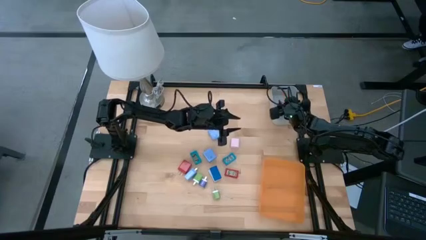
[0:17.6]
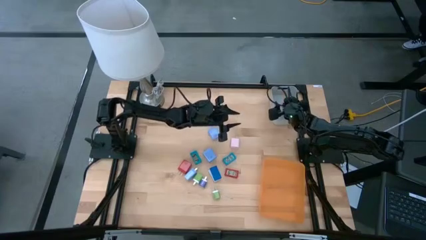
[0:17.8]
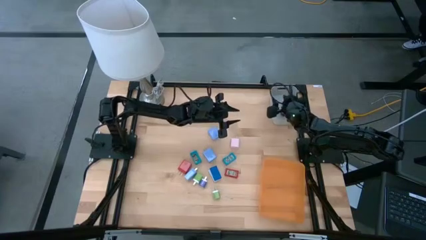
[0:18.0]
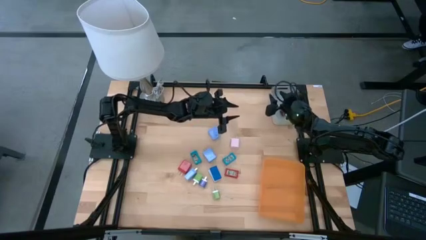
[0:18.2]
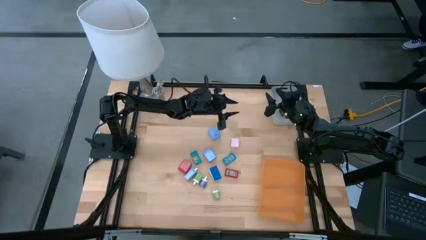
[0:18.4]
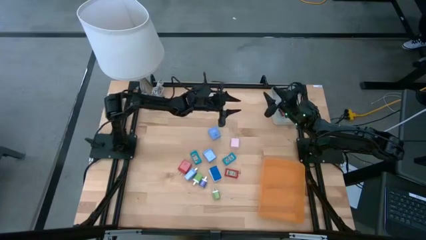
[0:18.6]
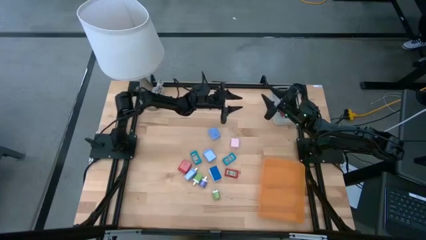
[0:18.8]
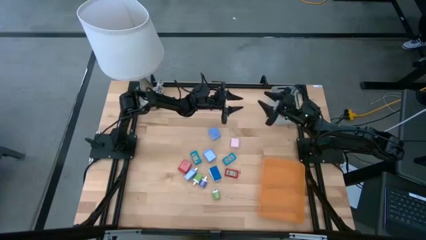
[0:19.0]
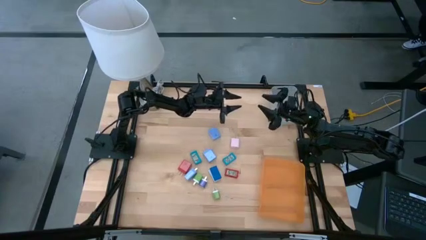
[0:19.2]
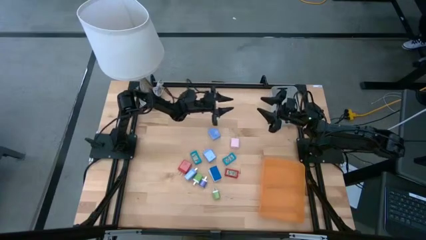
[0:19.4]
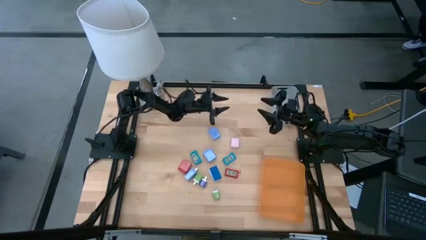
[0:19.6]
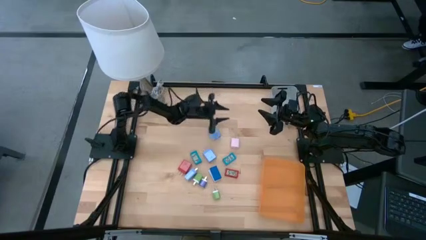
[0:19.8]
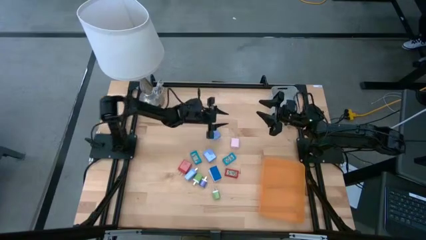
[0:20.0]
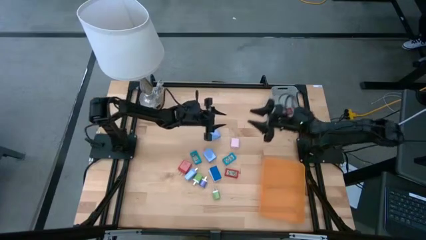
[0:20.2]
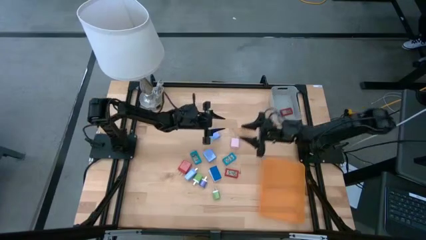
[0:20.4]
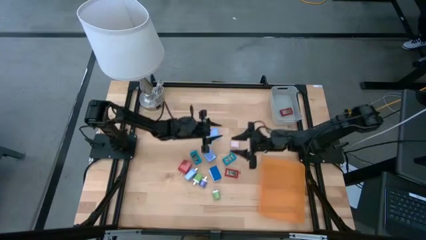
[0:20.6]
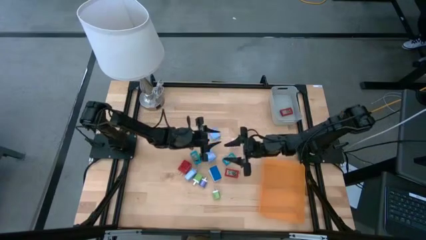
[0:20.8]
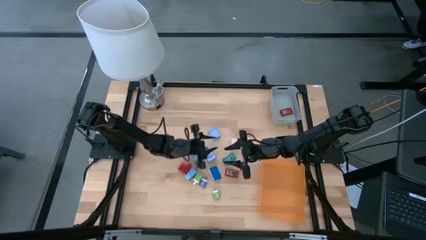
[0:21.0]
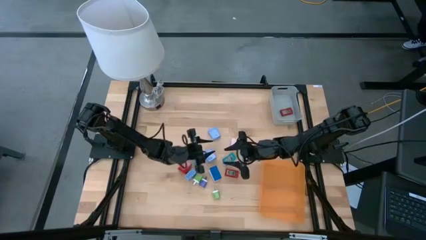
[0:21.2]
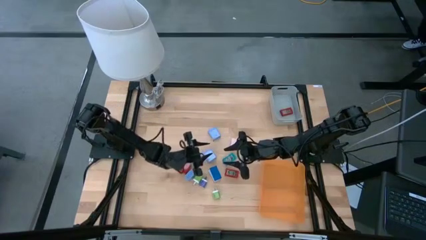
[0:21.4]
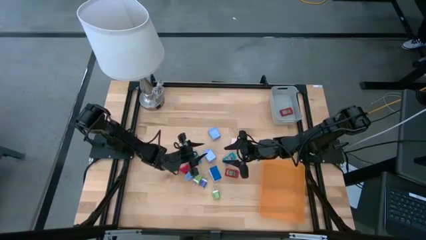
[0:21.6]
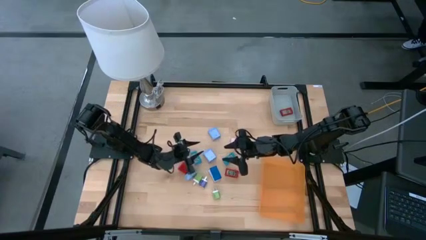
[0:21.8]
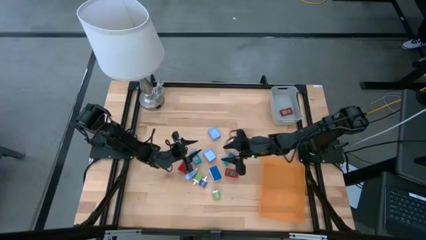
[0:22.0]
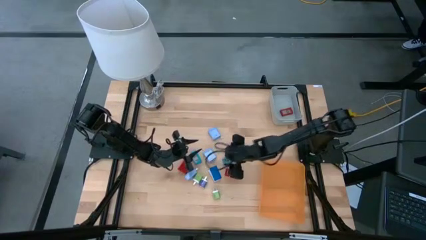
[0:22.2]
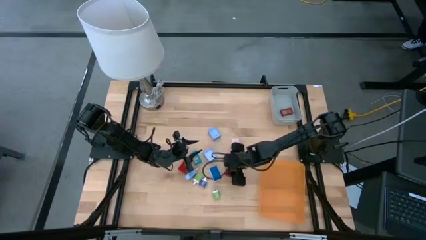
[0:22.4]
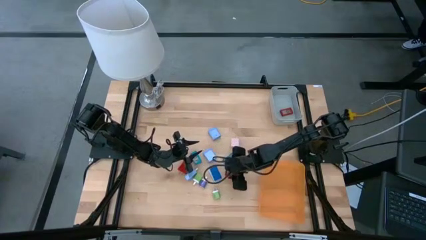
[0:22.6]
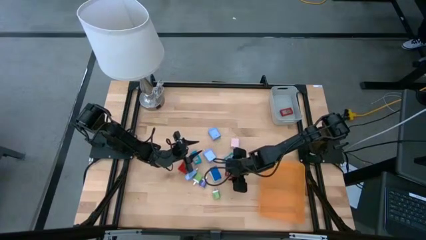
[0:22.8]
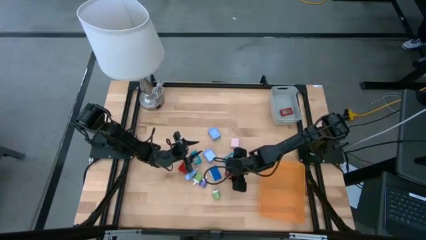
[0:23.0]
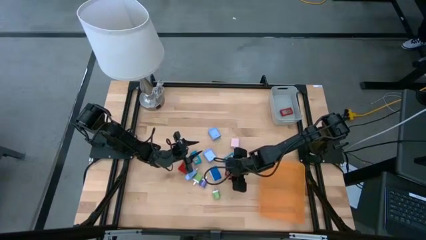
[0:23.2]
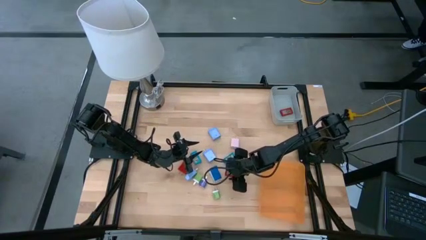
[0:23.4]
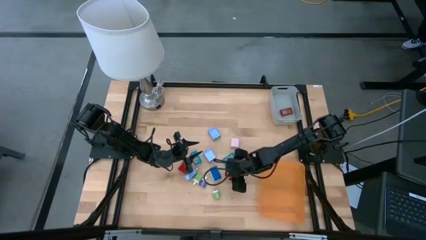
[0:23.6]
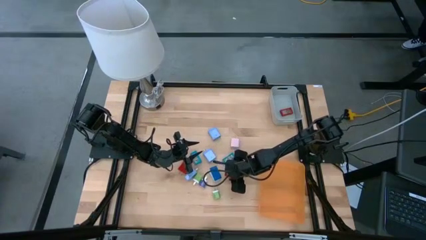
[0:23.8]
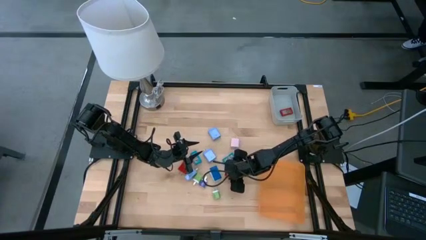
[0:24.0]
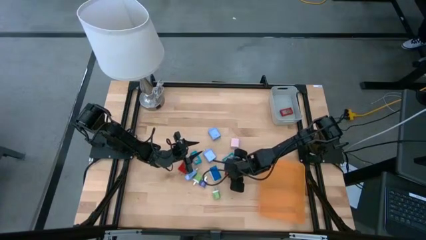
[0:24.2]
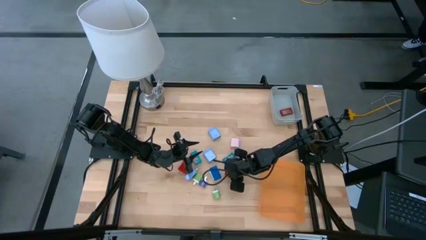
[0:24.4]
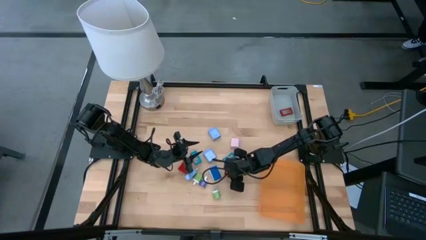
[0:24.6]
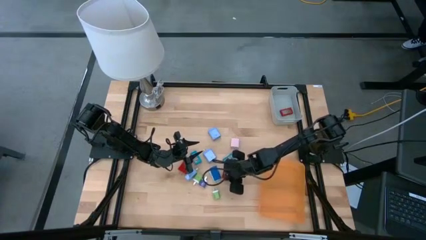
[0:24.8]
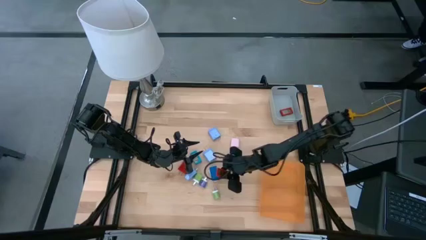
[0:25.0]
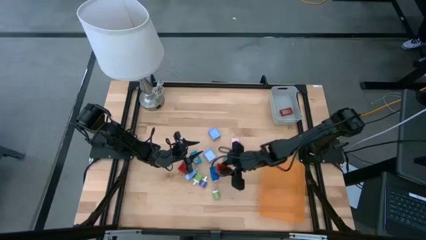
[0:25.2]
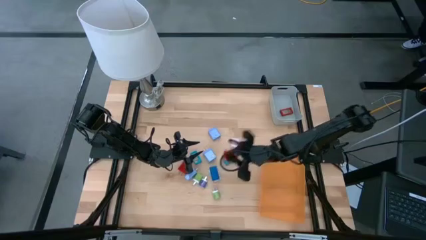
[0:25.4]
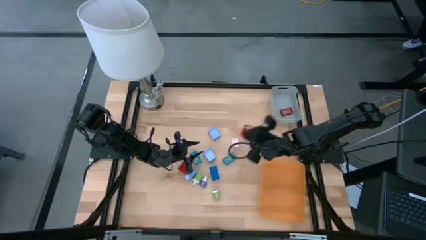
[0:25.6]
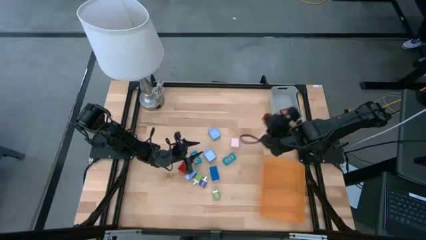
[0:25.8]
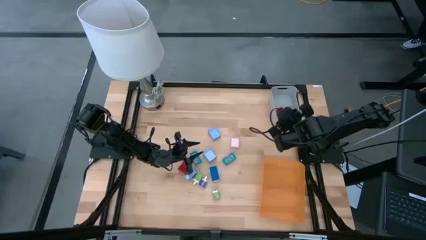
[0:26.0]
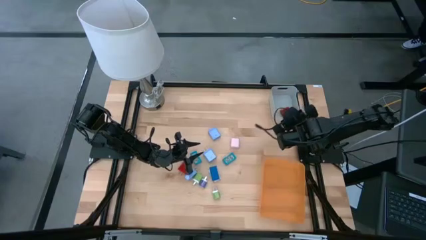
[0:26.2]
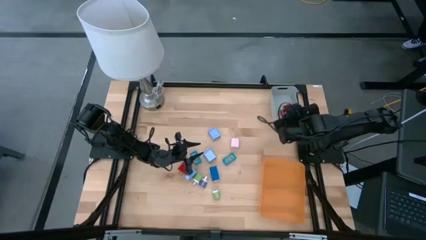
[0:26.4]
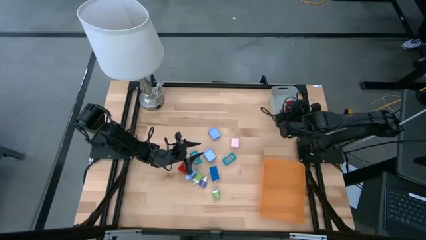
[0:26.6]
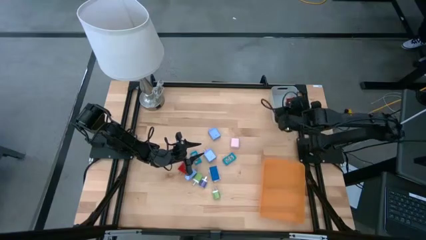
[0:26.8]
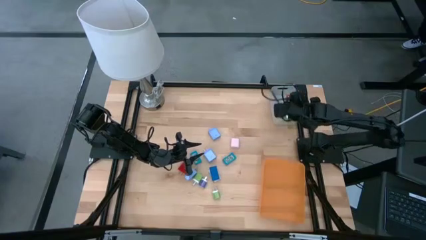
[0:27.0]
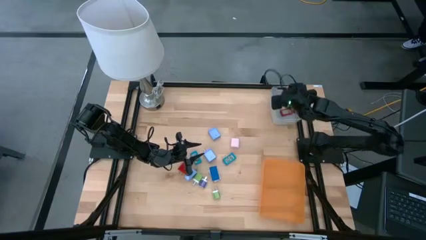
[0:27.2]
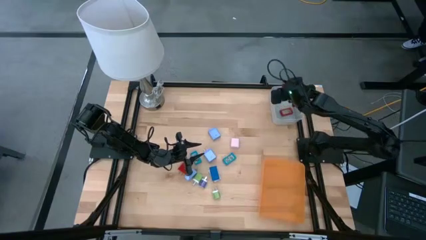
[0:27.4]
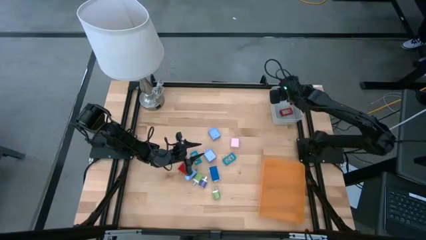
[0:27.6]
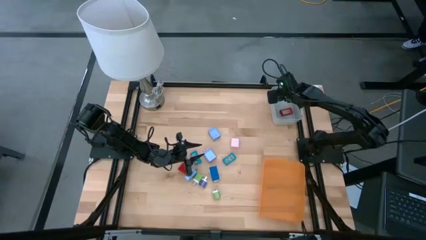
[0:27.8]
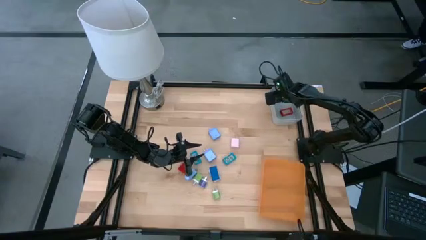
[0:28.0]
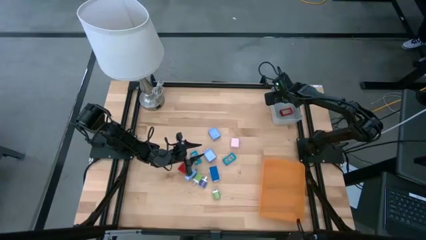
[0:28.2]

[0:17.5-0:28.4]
Task: Pick & Place Office items
Put the red digital clock into the gray bin

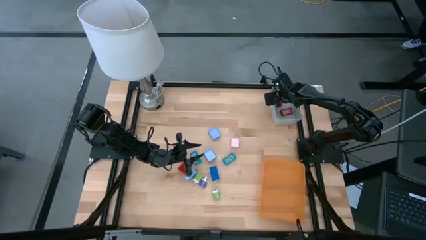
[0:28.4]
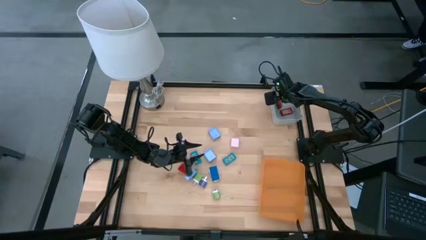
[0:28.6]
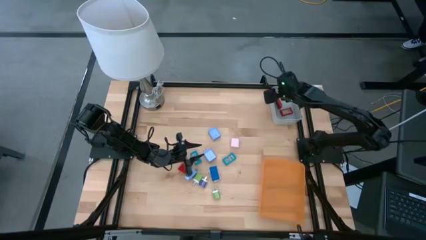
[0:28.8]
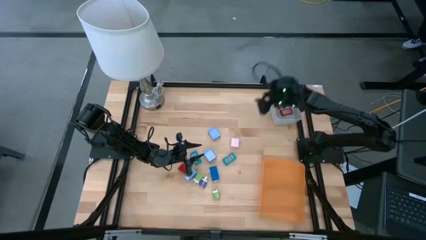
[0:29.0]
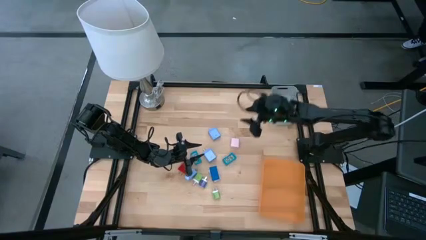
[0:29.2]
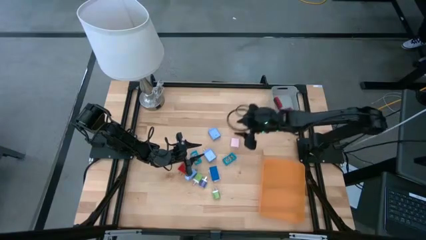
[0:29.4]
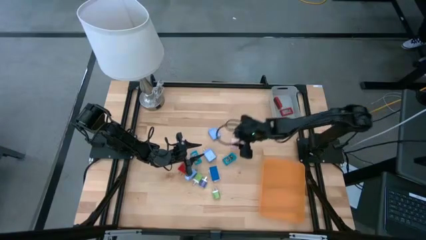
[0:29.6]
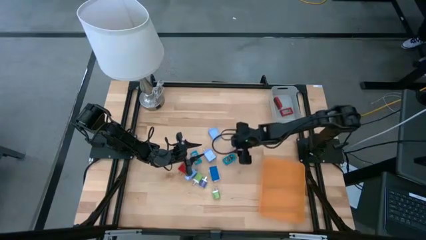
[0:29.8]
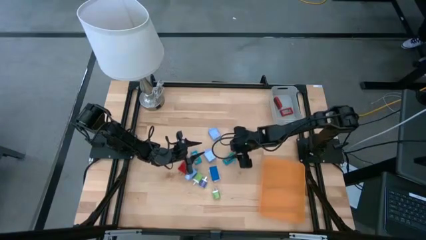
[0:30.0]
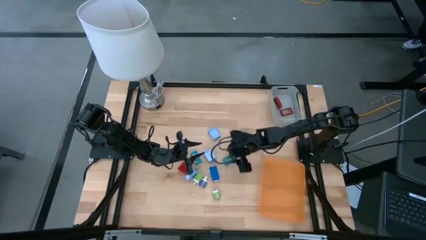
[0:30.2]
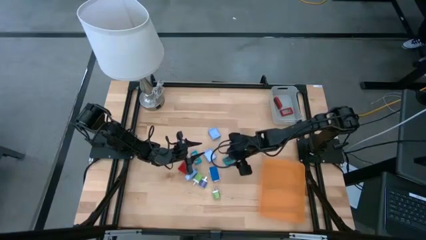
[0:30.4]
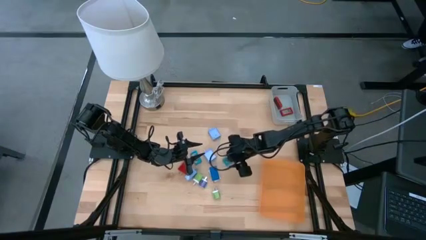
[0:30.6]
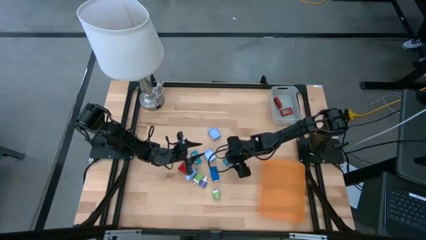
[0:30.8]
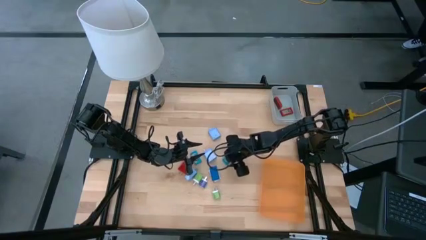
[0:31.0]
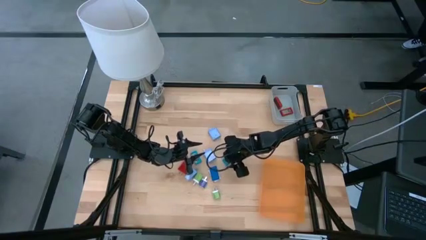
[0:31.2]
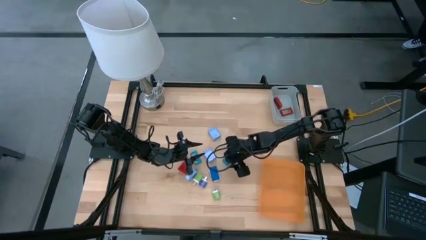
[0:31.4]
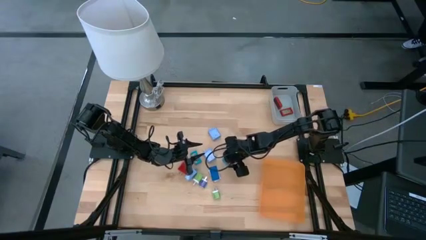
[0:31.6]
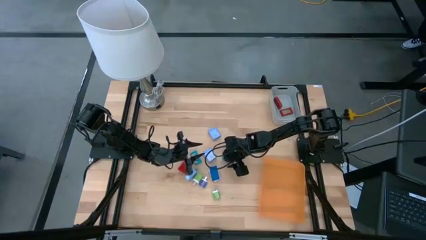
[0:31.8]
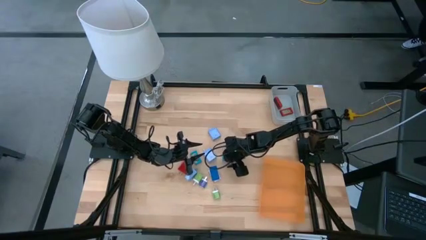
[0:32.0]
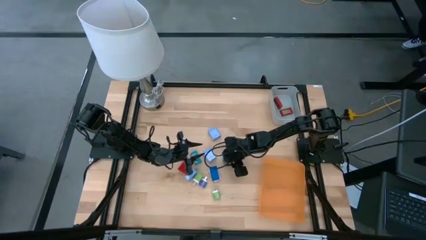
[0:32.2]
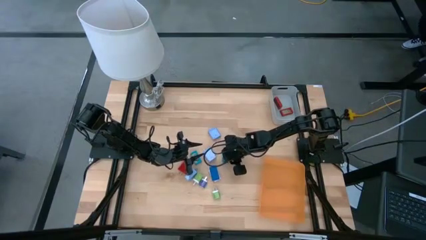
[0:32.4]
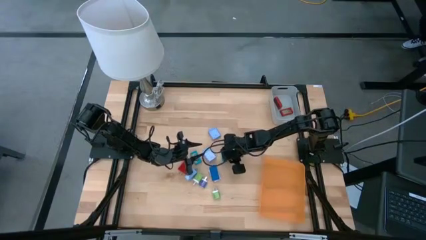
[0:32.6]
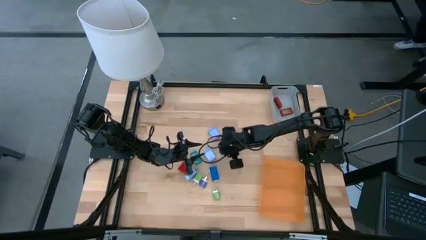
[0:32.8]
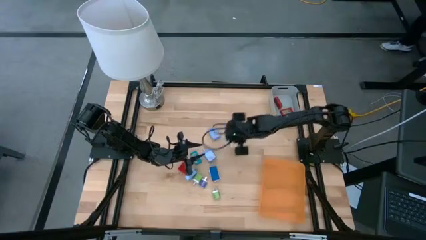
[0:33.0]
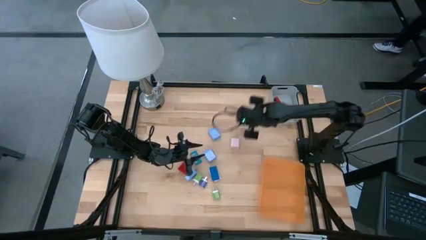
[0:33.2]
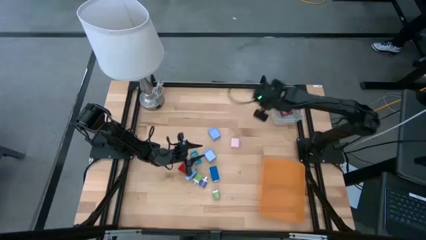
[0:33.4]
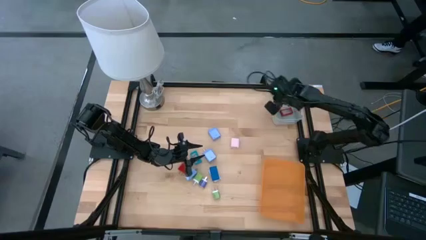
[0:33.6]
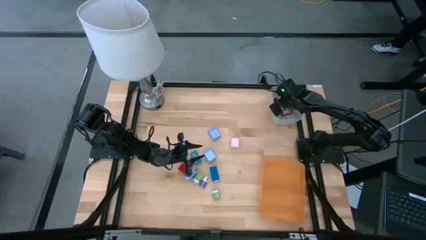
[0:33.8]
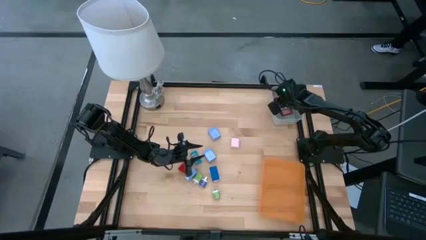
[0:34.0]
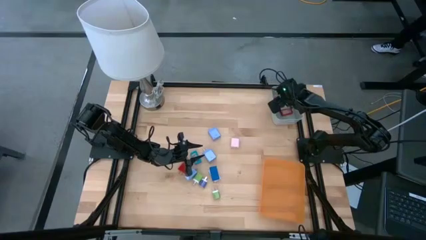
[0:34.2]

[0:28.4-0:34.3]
Put the right light blue digital clock into the gray bin
